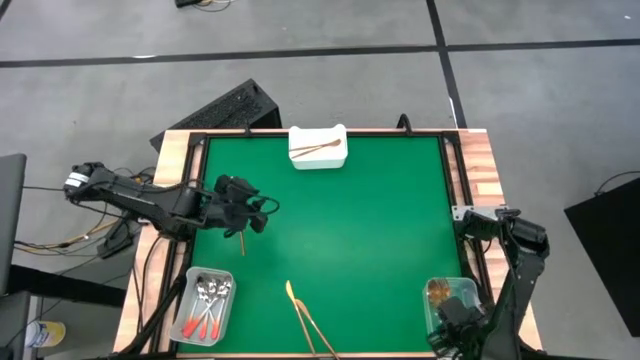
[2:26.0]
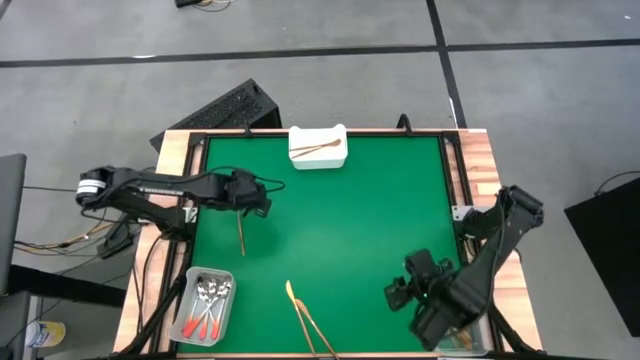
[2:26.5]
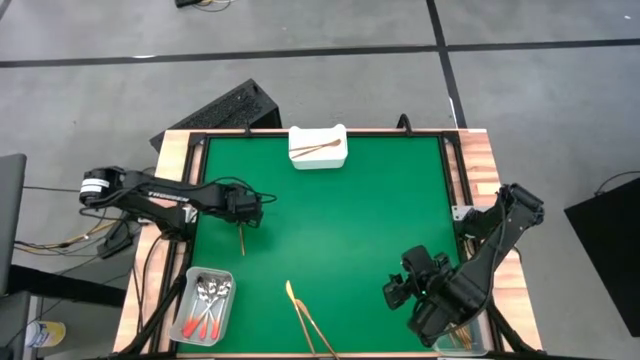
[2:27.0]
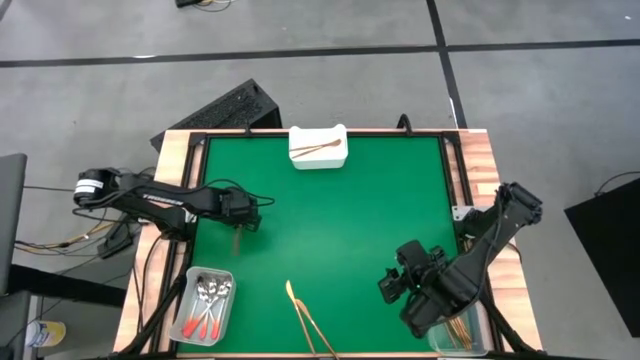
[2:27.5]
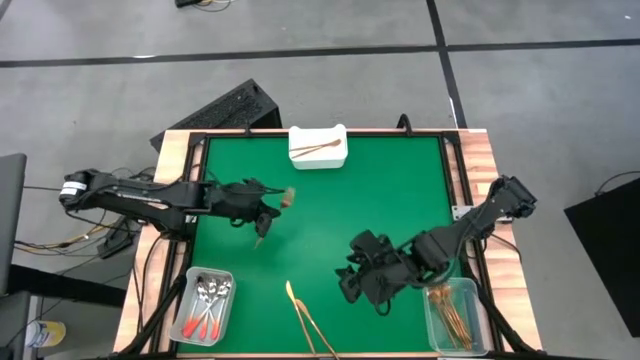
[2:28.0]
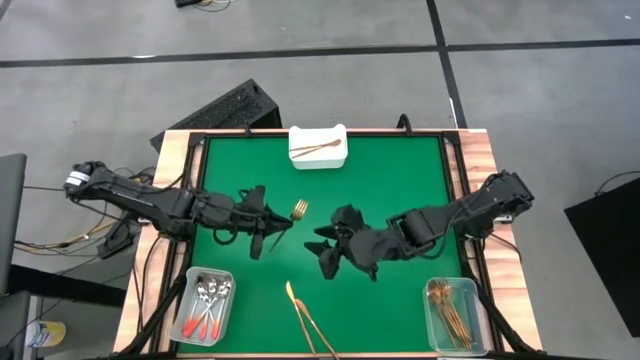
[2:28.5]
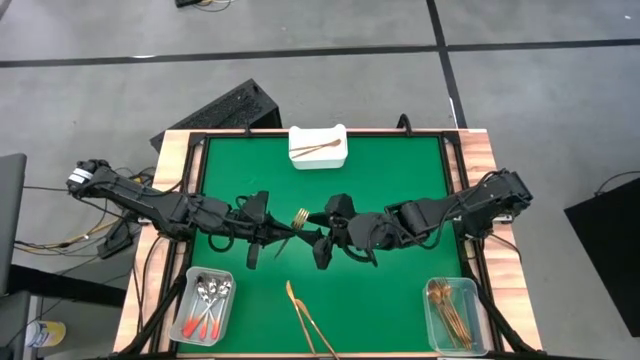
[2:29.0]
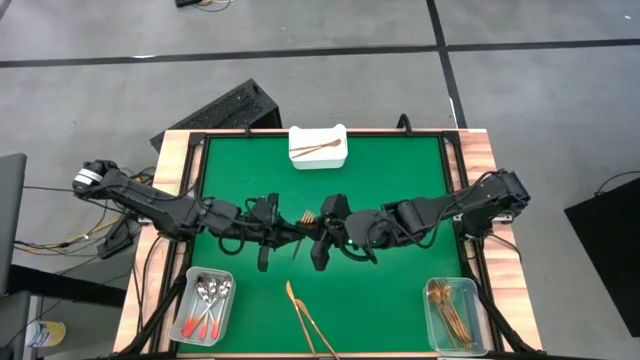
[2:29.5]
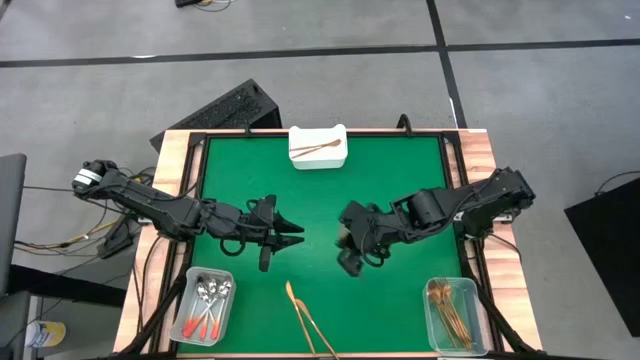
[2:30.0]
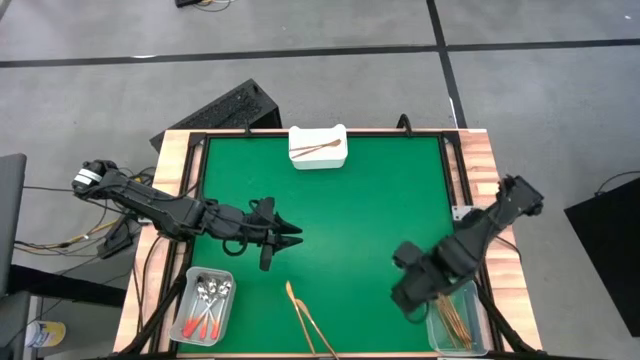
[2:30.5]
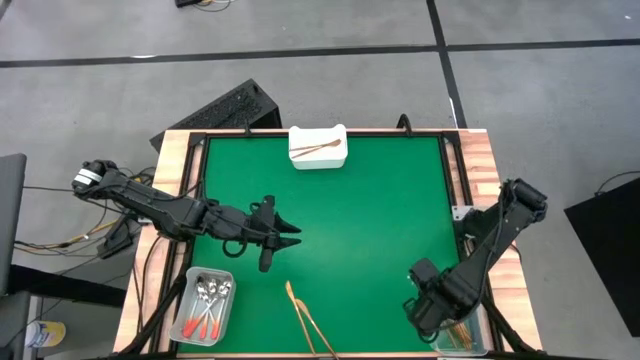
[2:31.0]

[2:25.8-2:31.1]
Task: Sort silverware by color (type)
Put the gold fork into the transparent bin

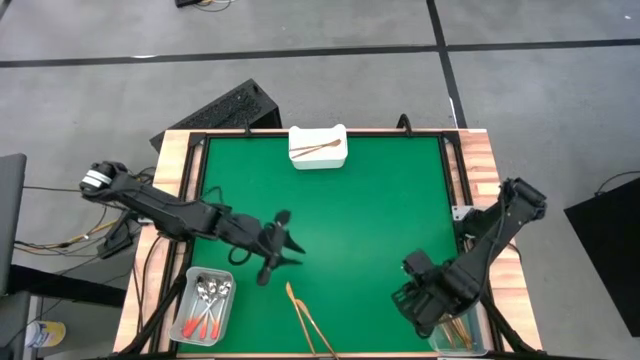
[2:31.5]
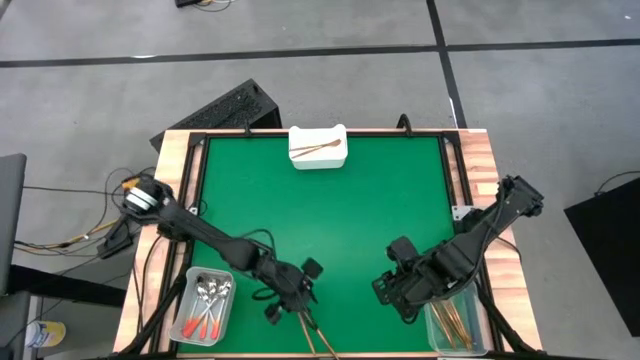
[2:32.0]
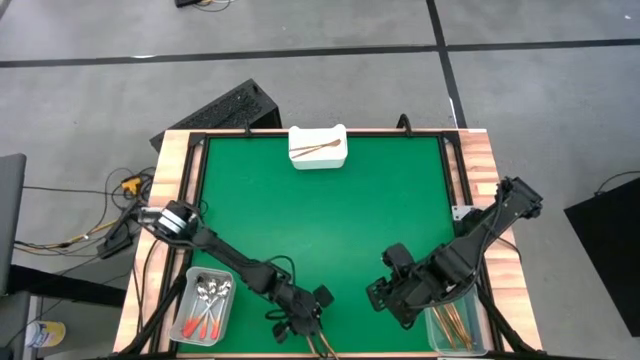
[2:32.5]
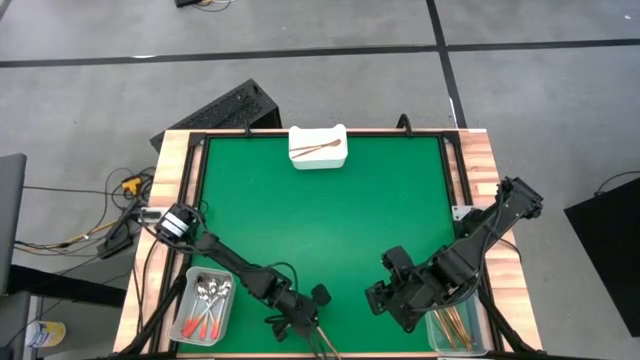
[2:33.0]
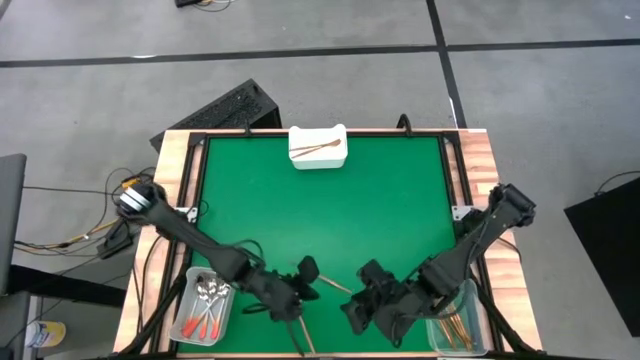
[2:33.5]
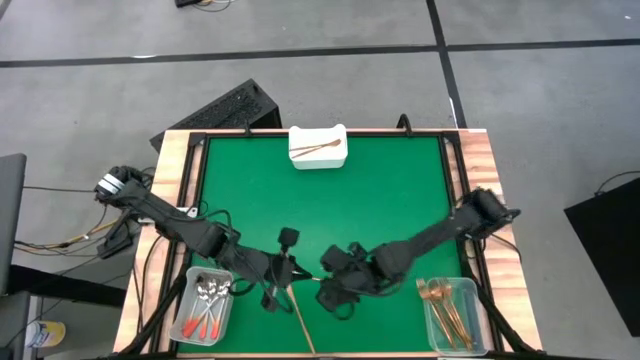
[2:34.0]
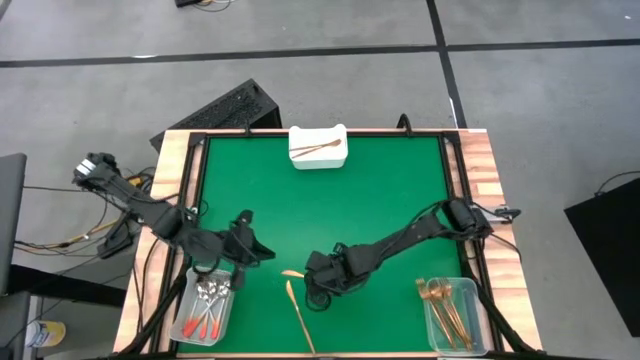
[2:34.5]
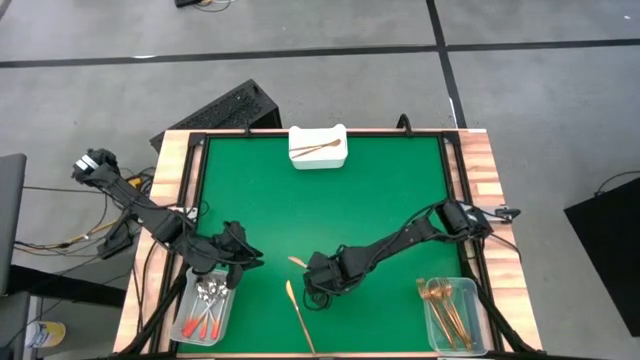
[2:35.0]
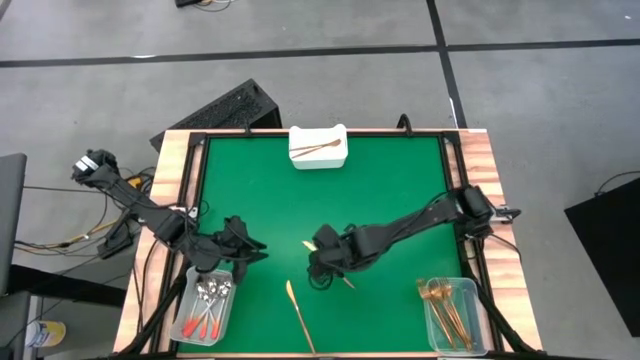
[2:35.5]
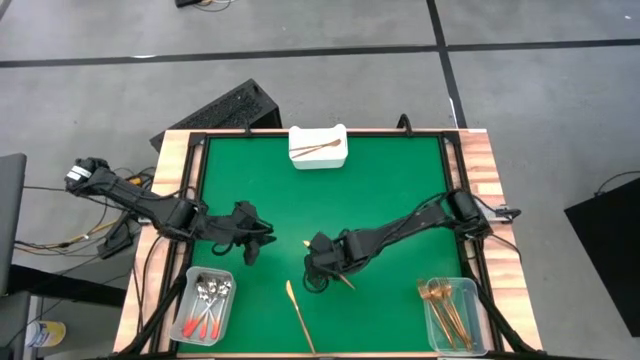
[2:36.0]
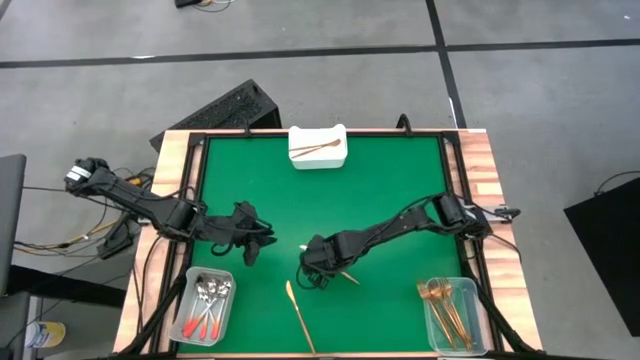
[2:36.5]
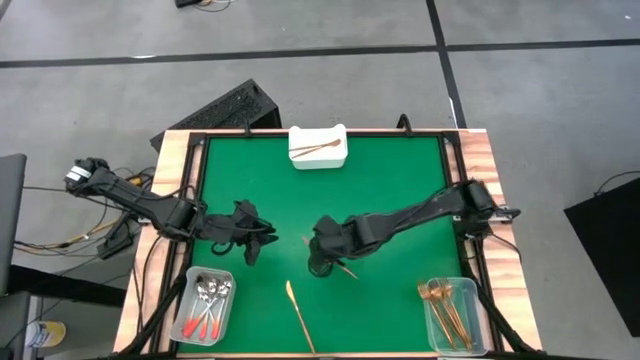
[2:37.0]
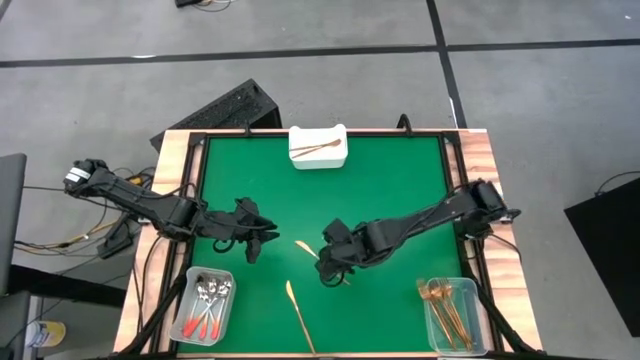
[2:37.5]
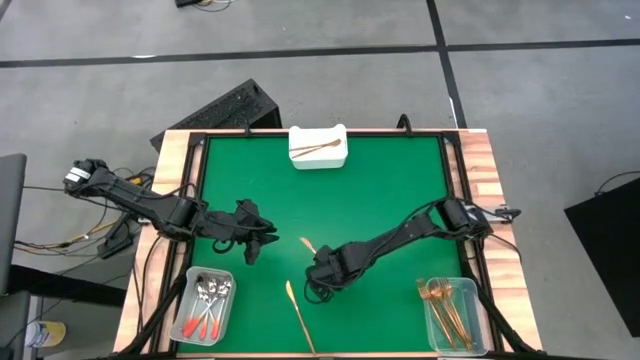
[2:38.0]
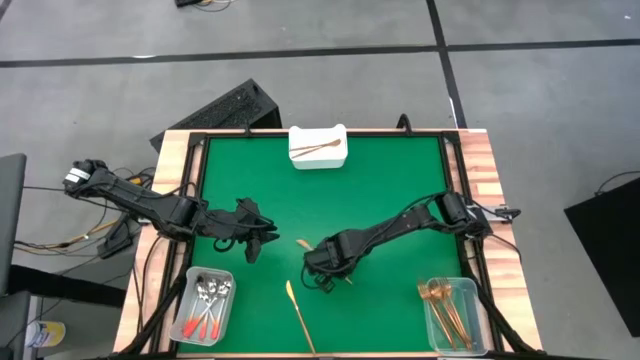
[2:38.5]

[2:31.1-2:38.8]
Put the gold table knife into the white bin

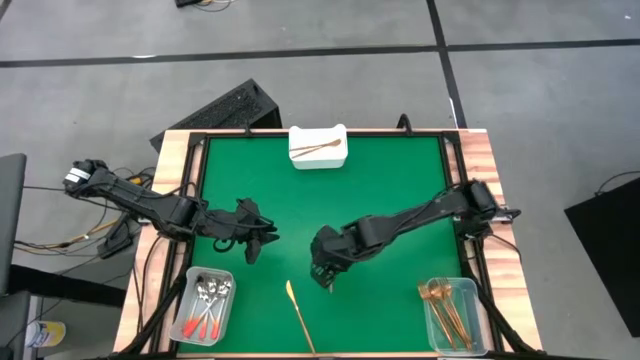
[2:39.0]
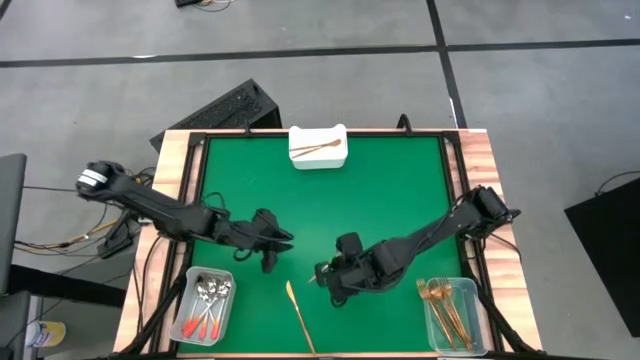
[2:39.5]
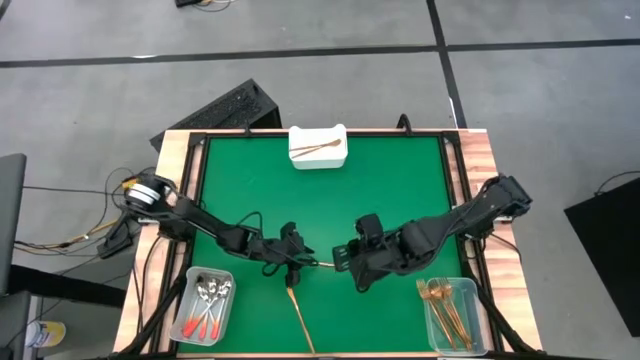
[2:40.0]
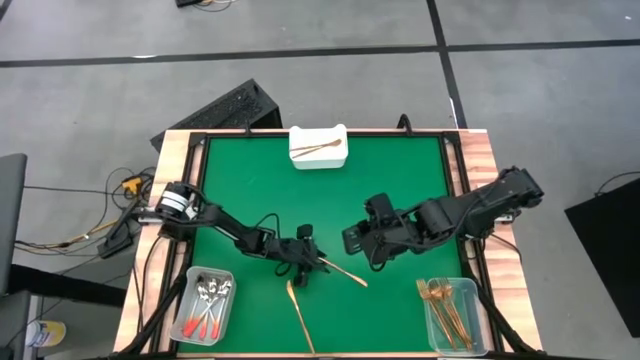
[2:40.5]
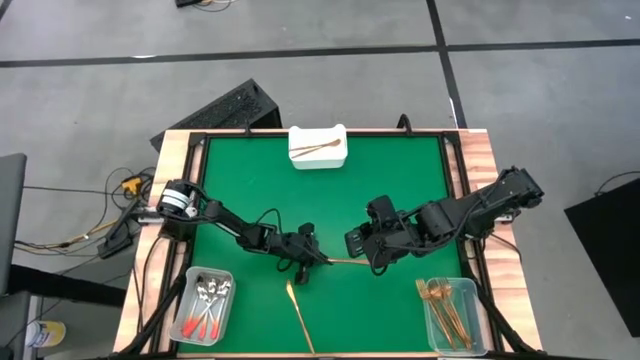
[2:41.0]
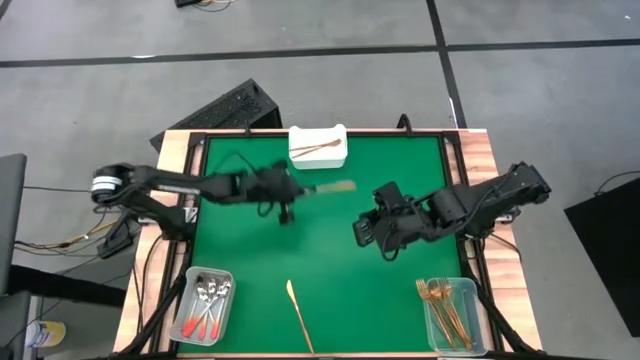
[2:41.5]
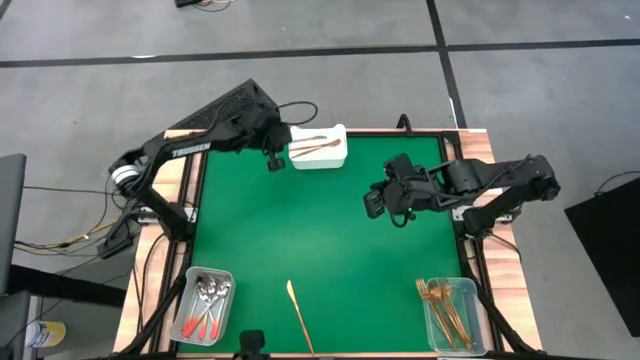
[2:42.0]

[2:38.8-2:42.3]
Put the gold table knife into the white bin

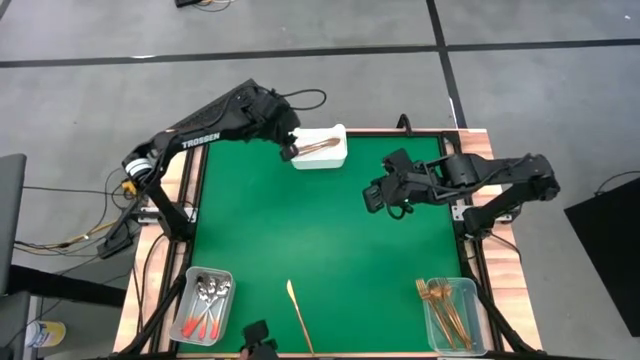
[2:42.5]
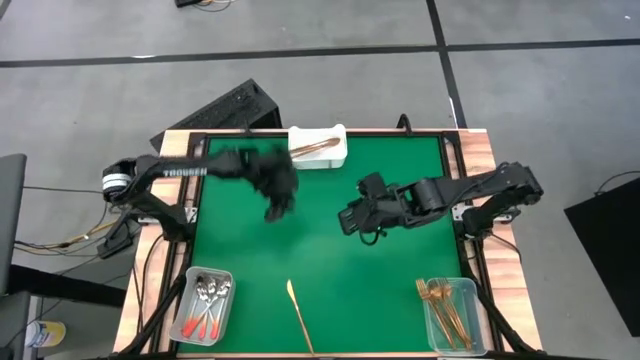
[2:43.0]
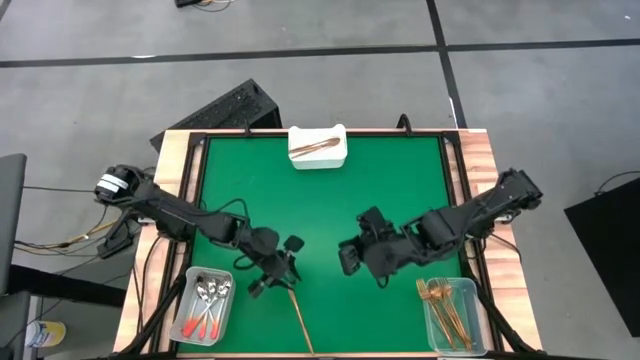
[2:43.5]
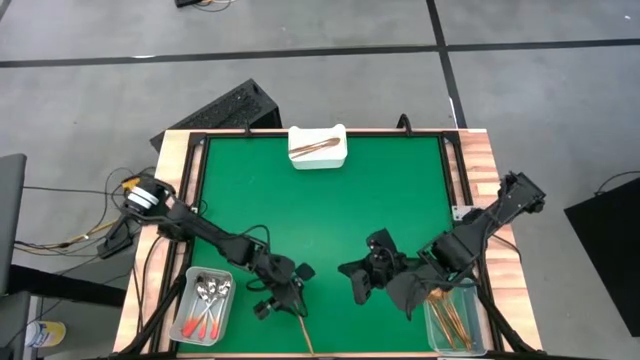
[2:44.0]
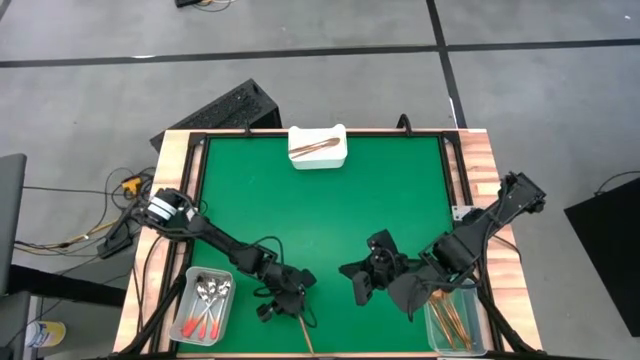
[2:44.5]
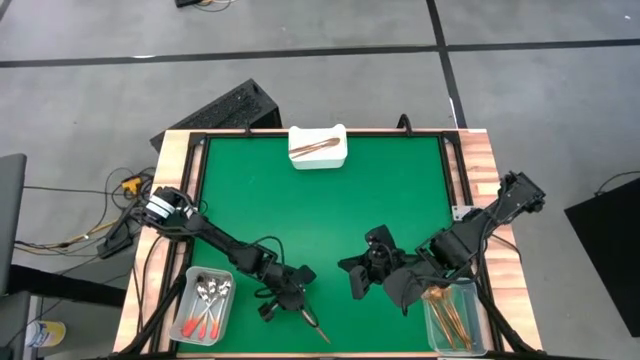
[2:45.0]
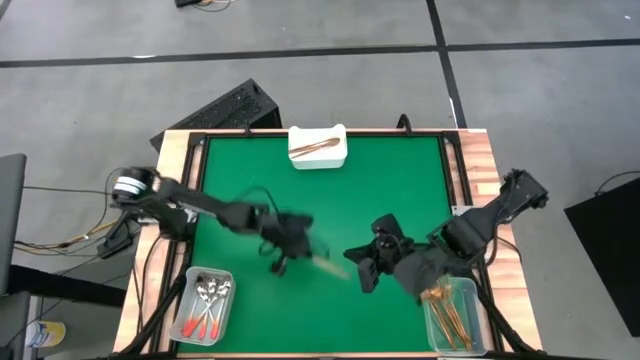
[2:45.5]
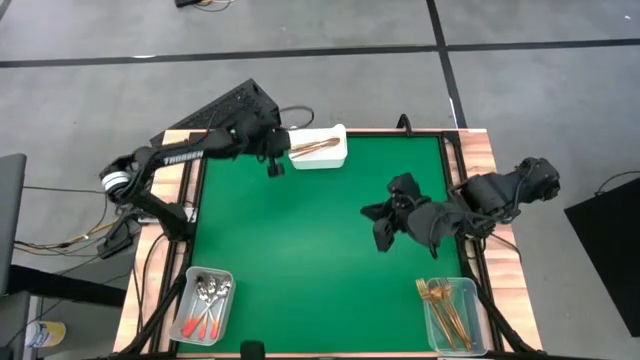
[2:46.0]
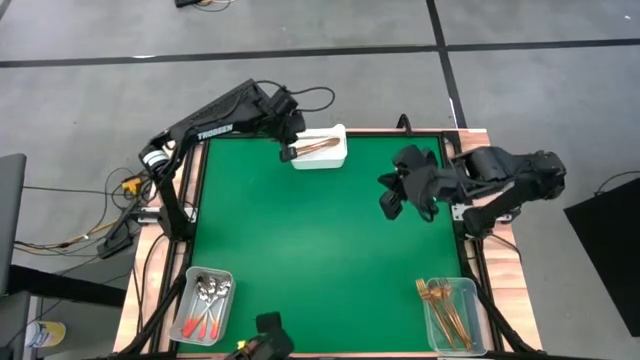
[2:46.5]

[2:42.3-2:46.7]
Put the gold table knife into the white bin

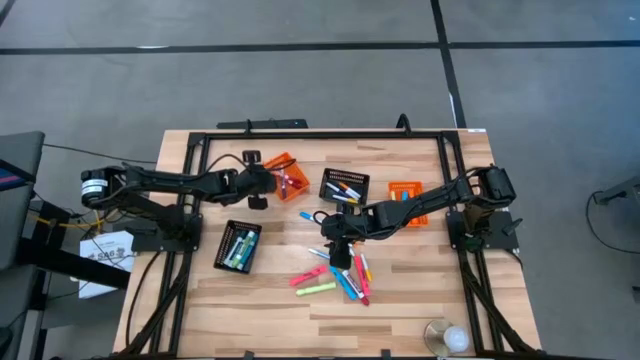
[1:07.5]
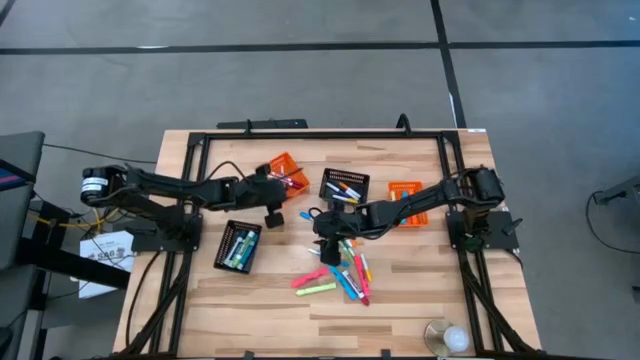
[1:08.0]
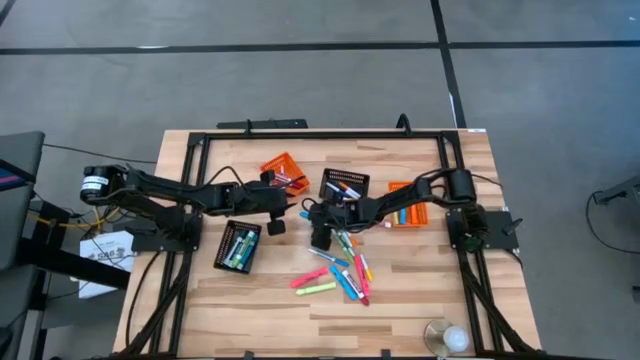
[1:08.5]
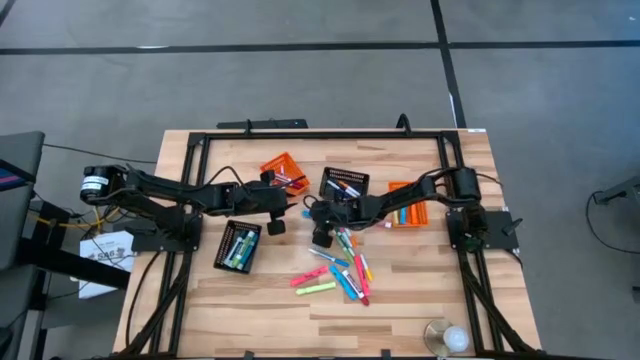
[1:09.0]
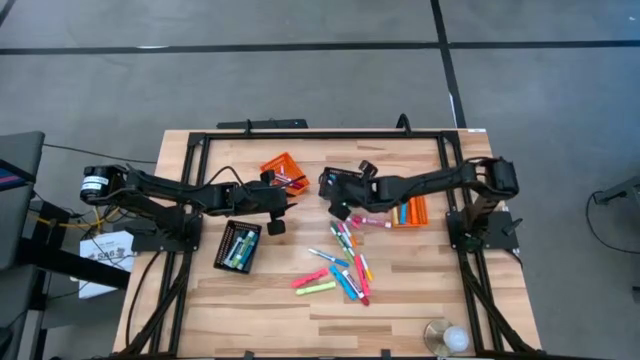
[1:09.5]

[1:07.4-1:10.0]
Task: Pick & Place Markers
Put the light blue highlighter into the right black bin
